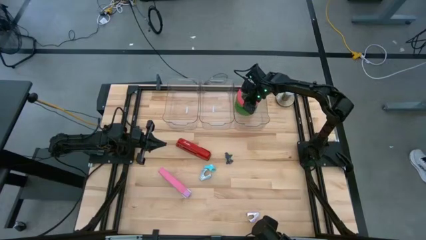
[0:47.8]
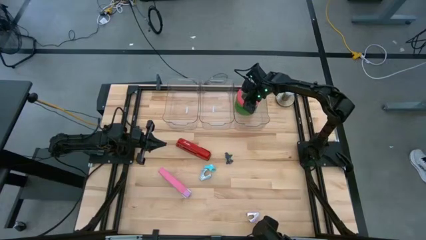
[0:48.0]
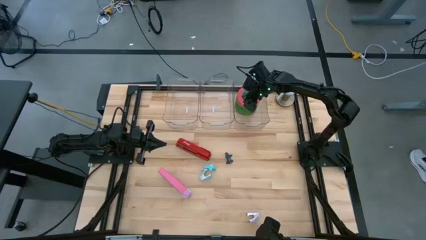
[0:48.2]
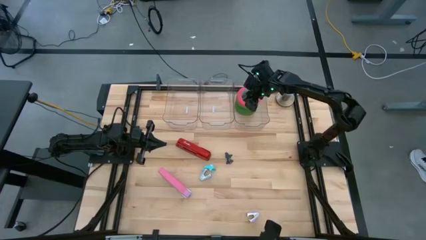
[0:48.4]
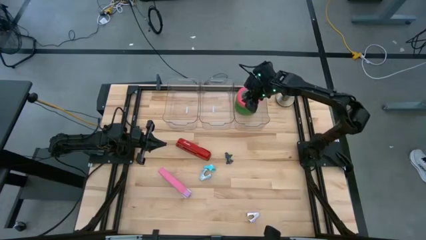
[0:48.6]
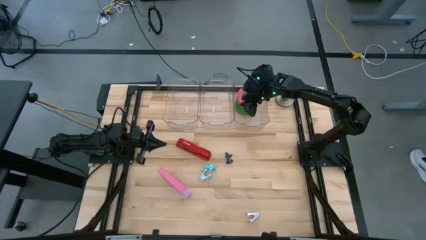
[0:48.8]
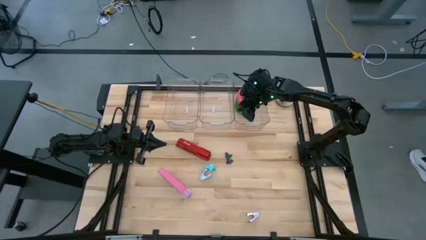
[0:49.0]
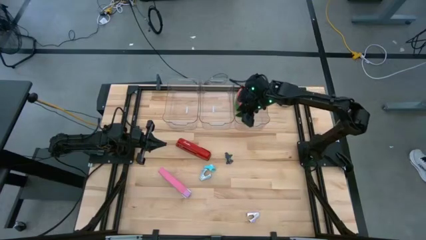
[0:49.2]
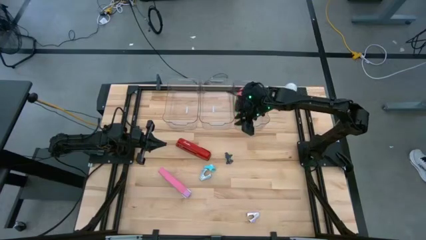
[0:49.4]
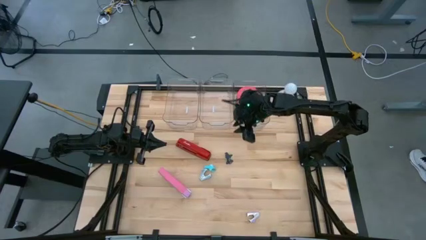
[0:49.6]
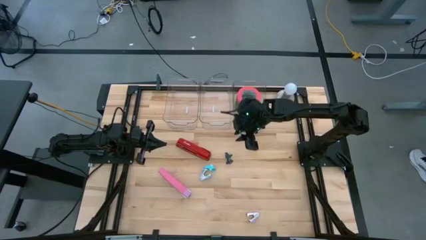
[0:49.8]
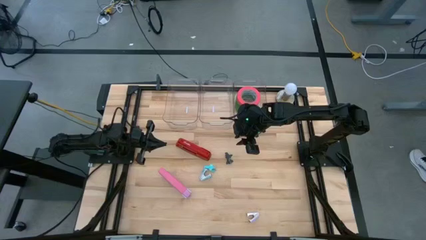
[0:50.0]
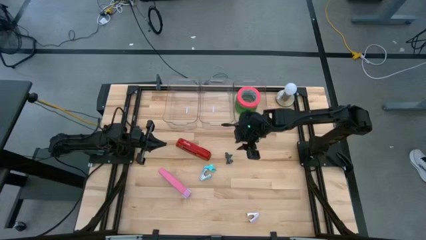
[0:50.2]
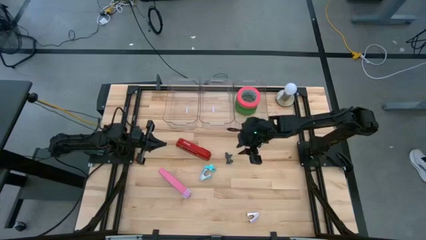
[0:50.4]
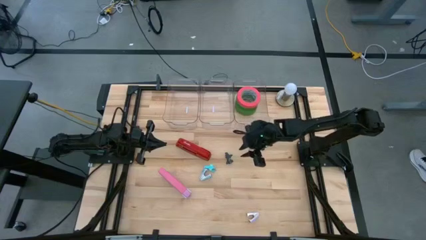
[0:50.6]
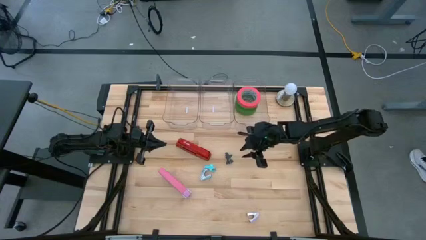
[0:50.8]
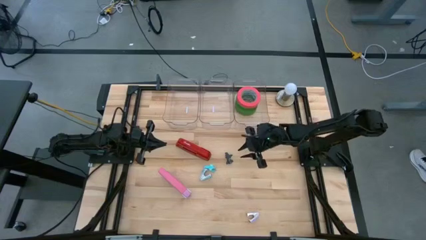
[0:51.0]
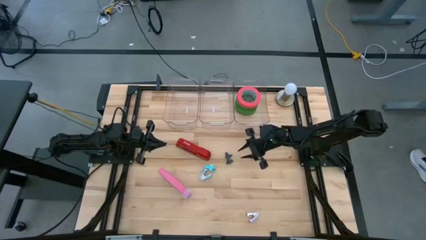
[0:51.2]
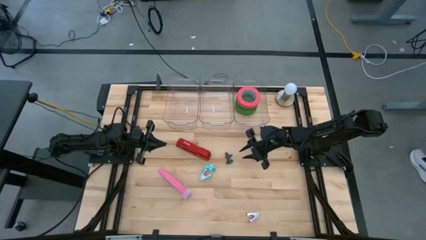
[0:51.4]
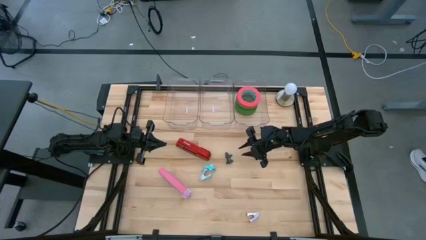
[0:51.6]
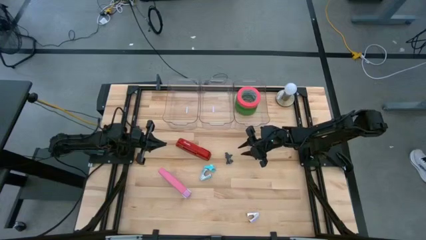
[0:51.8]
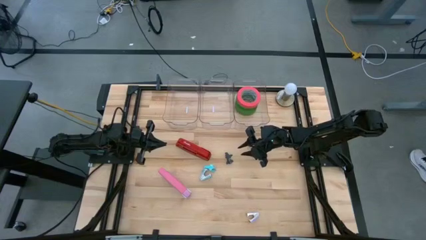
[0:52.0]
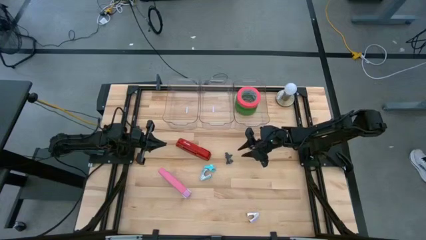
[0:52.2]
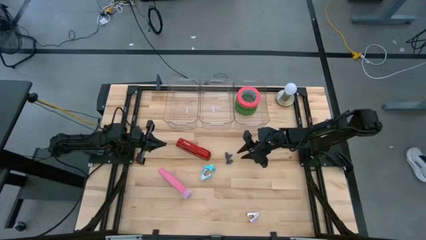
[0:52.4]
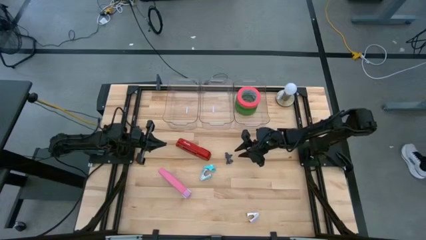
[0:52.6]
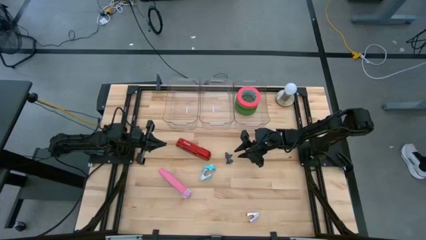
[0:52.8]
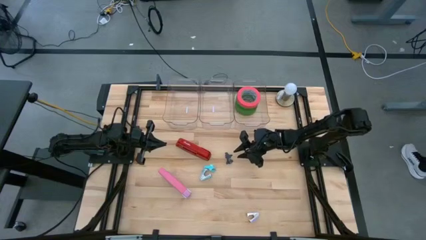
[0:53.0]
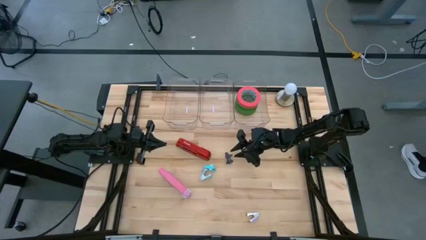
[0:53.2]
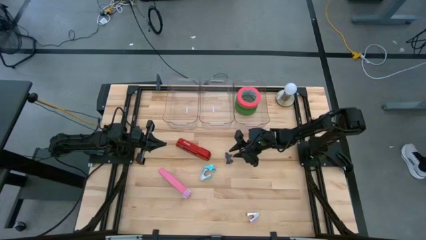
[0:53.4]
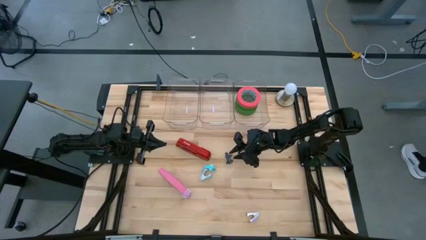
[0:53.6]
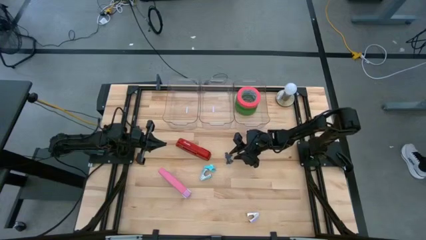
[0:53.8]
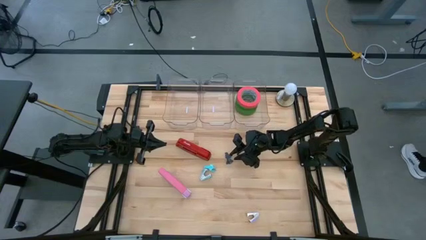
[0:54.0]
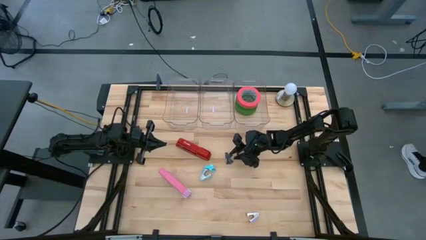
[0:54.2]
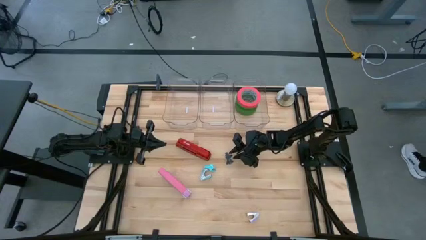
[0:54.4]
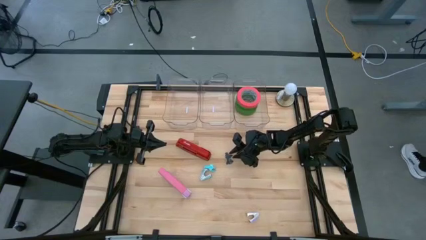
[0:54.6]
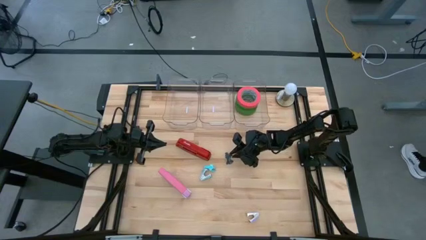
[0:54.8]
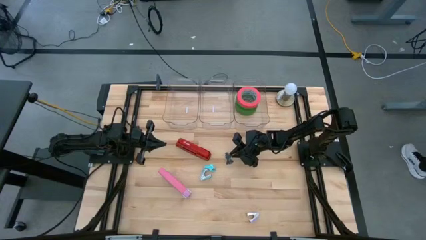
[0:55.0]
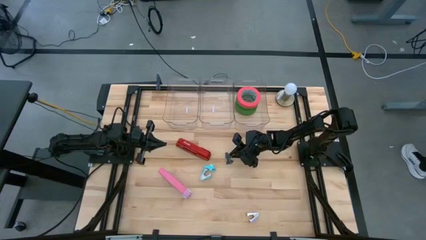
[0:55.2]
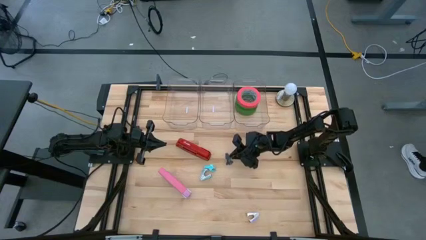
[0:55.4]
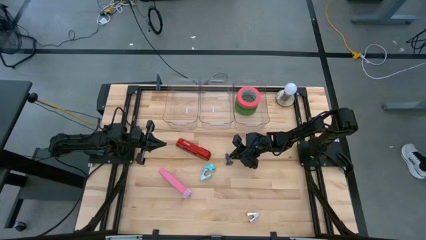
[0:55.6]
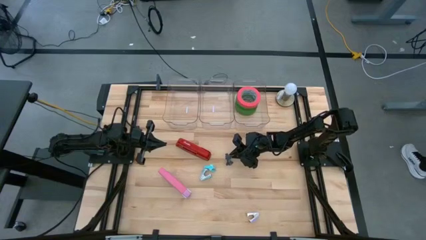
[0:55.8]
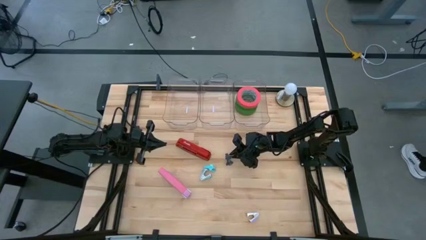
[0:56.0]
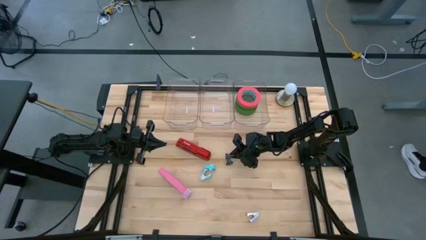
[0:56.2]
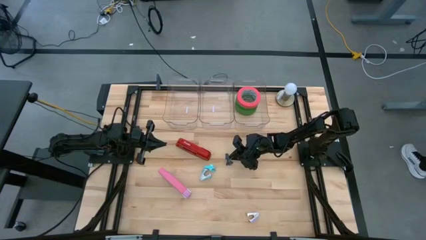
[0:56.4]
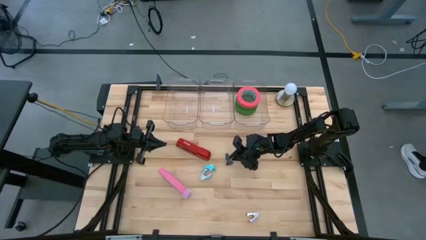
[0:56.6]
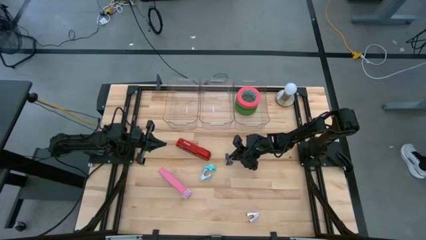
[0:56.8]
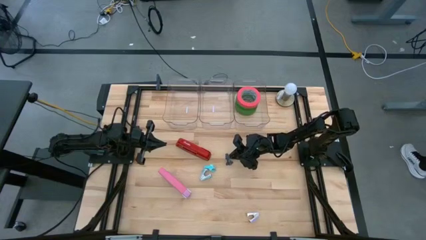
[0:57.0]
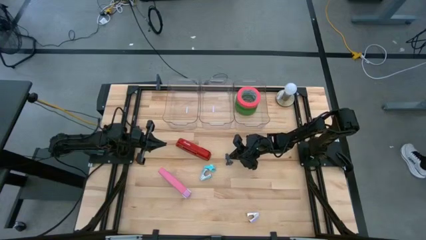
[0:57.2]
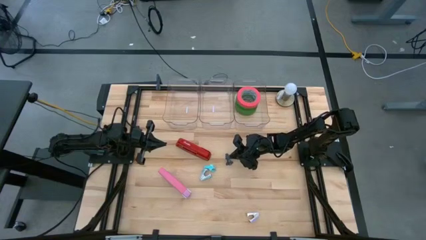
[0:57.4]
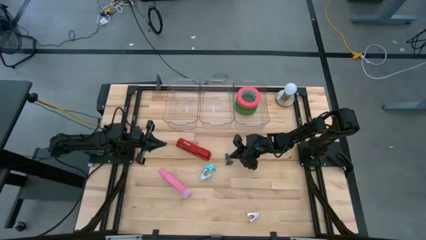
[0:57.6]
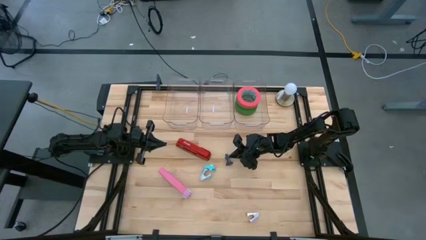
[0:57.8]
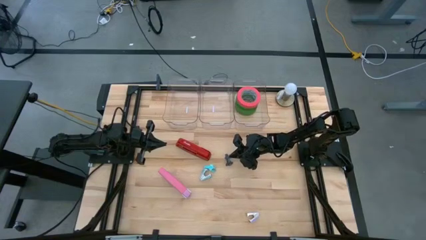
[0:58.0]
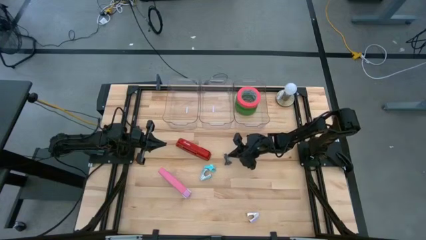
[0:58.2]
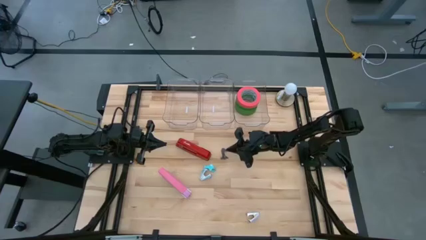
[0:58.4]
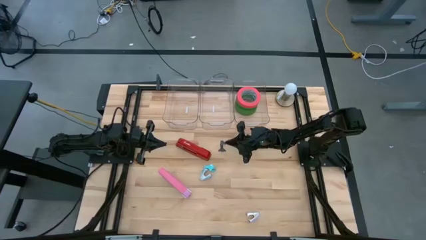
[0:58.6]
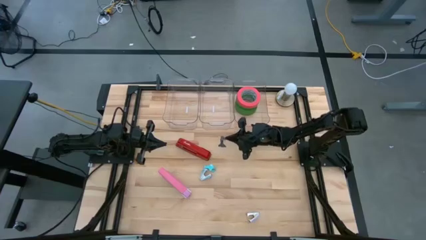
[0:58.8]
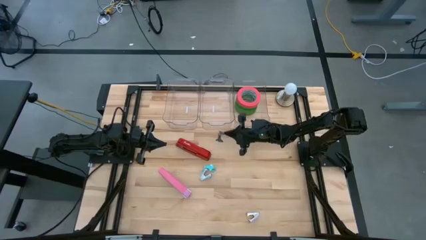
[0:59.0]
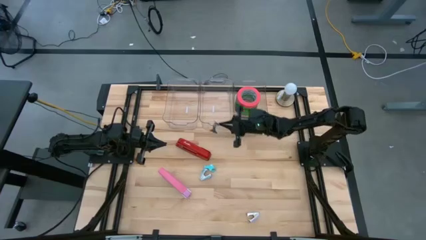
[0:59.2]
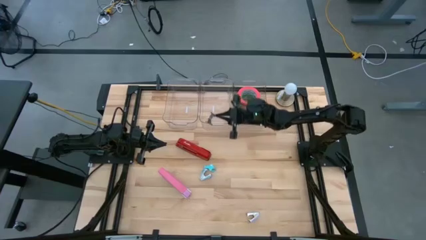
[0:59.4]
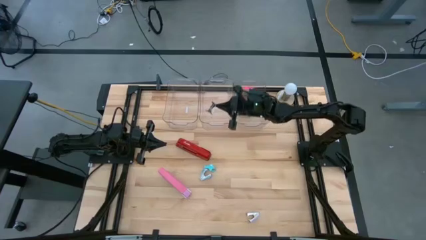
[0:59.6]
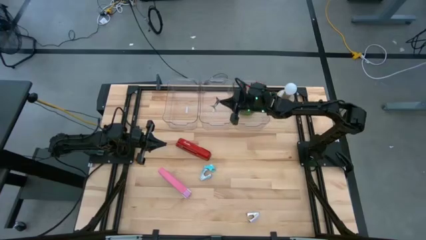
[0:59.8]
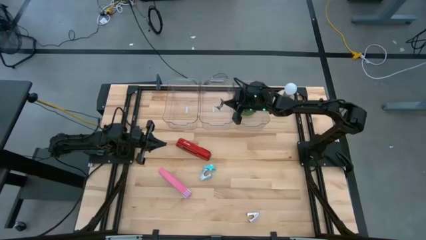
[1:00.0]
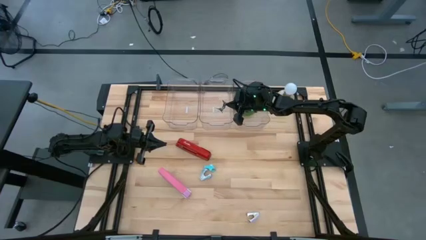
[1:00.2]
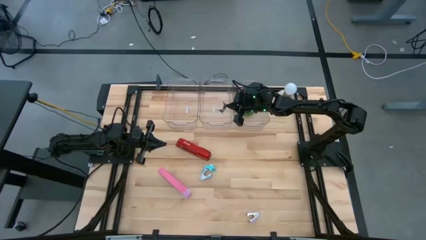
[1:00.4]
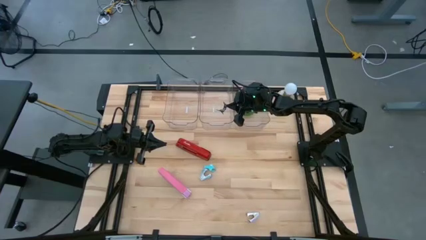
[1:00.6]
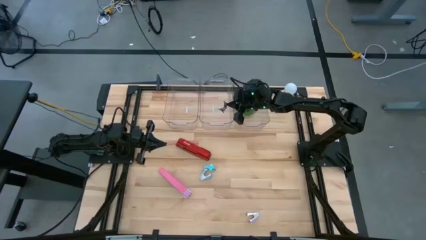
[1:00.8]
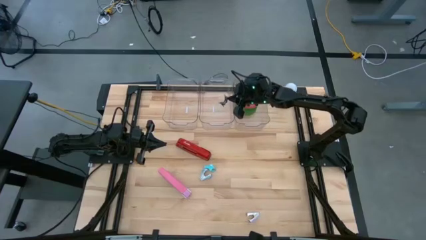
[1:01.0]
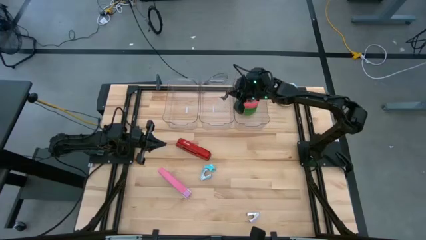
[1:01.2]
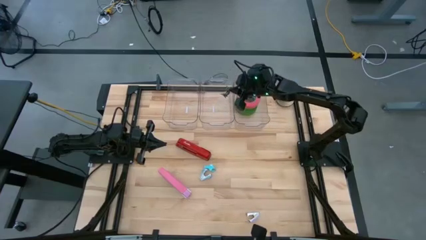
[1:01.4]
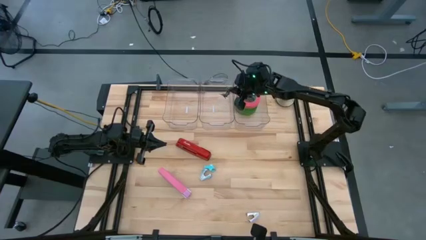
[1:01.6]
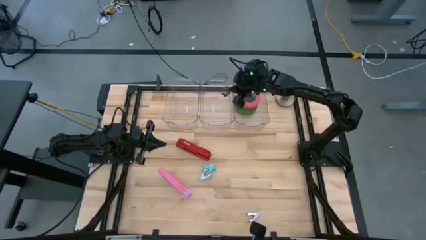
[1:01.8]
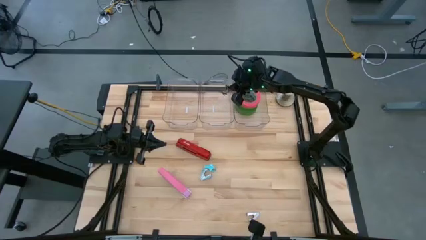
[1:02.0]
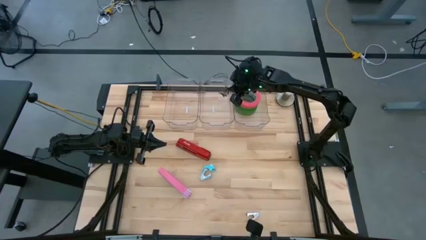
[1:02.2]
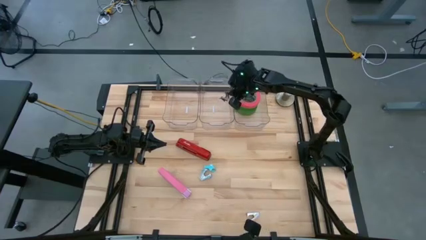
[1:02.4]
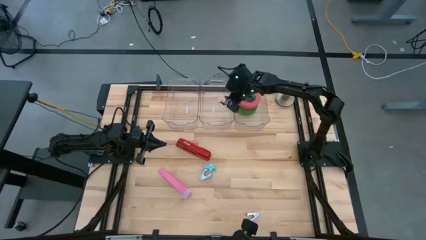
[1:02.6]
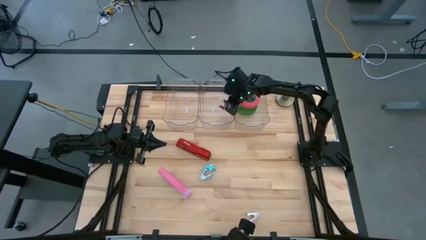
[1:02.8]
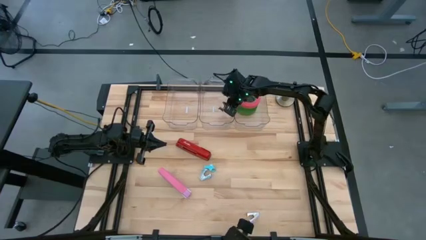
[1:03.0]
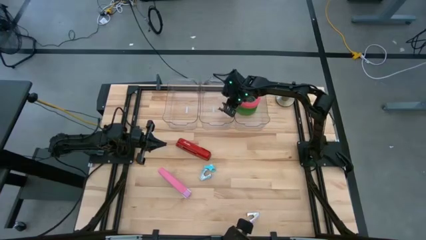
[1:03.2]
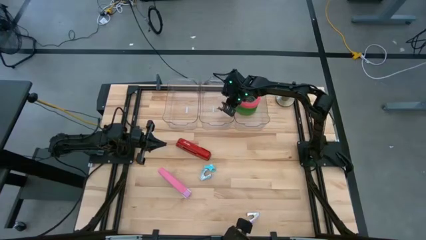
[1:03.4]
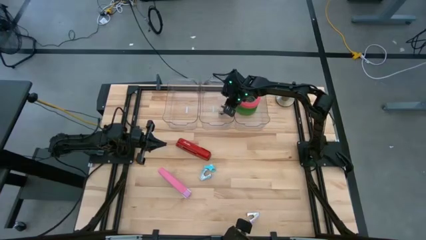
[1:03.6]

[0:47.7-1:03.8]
Task: Pick and place Stapler, Stapler remover, tape
Put the black staple remover into the middle transparent bin
